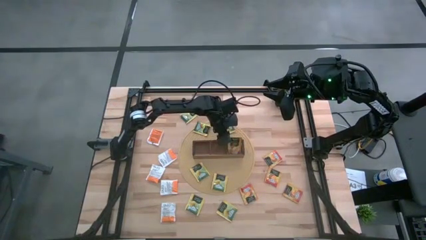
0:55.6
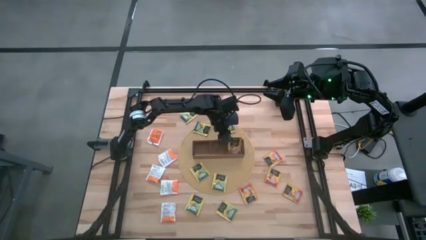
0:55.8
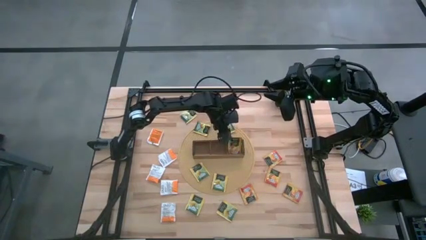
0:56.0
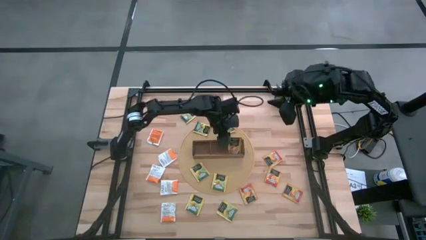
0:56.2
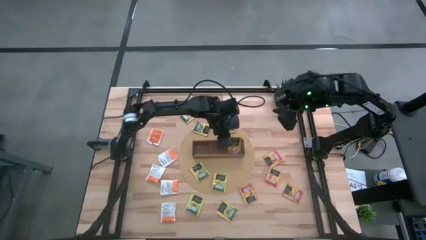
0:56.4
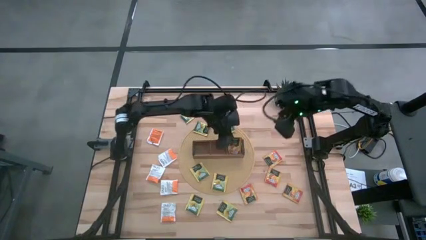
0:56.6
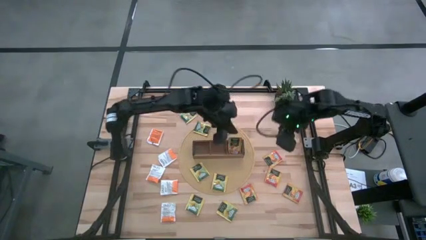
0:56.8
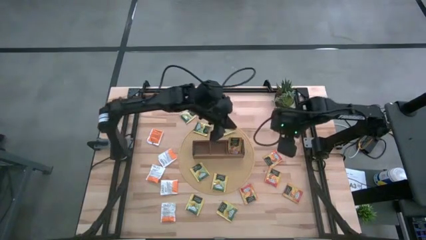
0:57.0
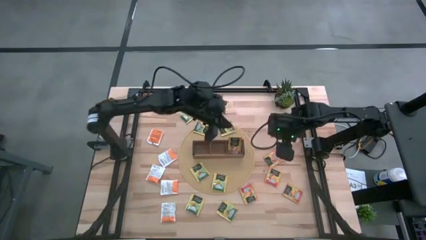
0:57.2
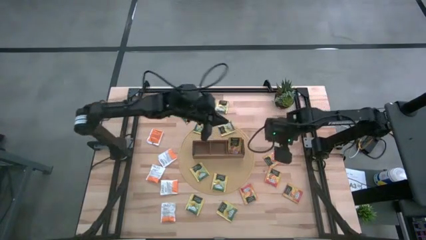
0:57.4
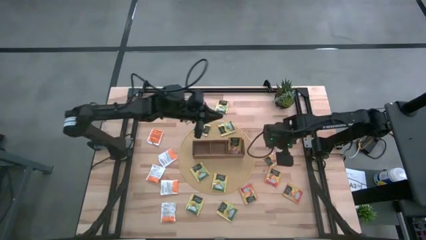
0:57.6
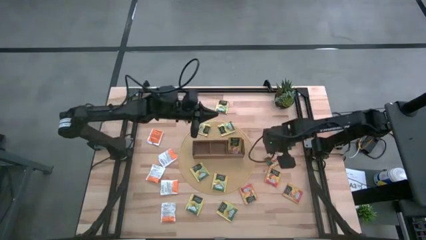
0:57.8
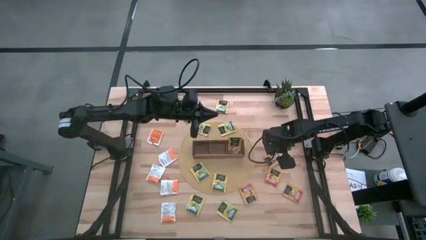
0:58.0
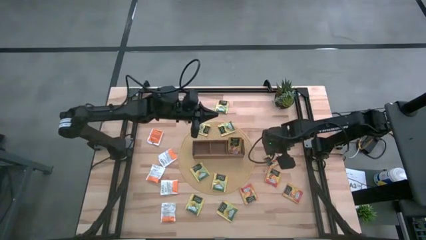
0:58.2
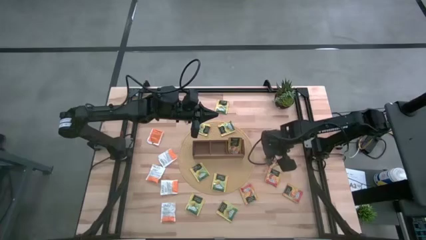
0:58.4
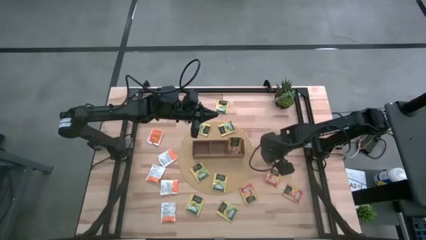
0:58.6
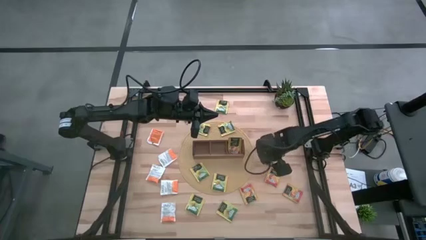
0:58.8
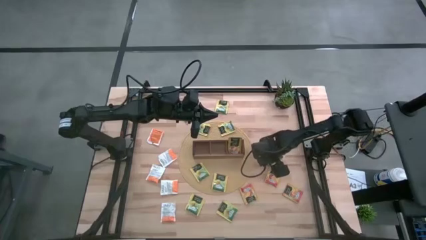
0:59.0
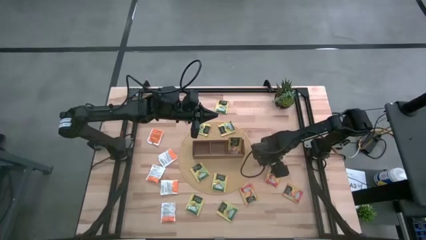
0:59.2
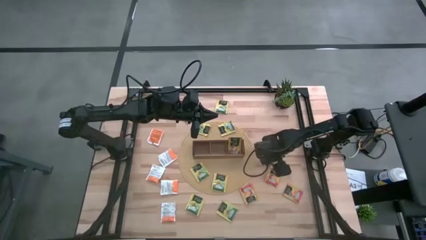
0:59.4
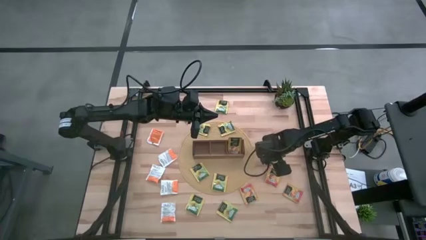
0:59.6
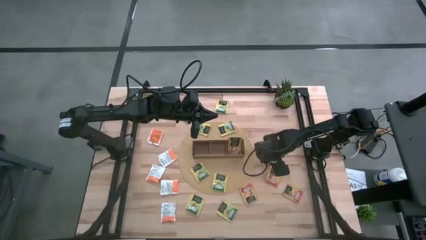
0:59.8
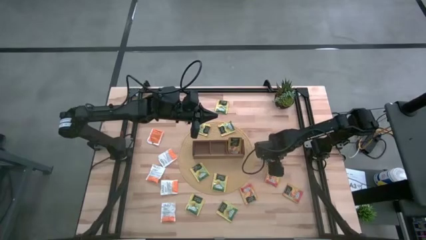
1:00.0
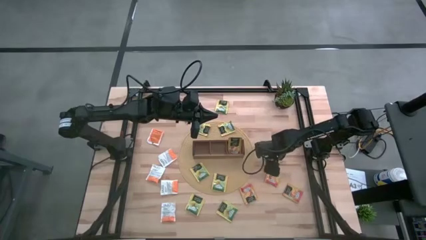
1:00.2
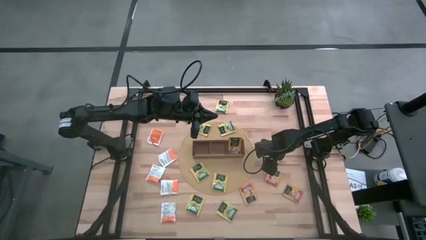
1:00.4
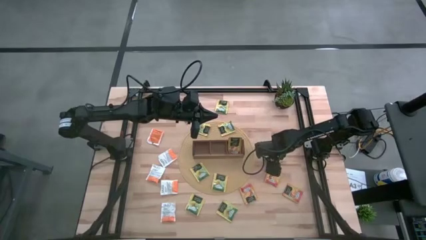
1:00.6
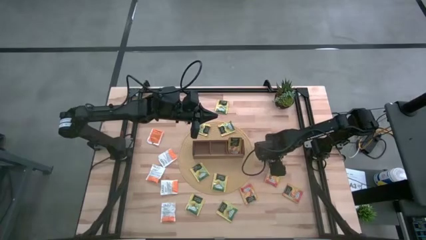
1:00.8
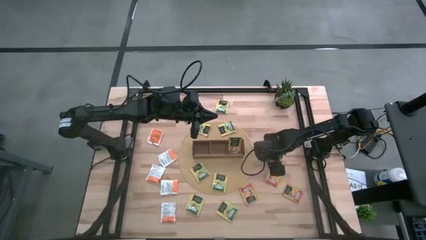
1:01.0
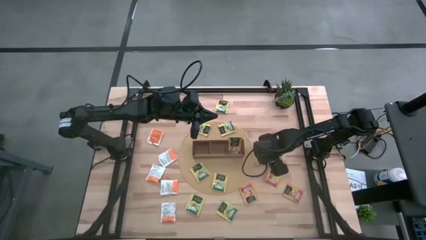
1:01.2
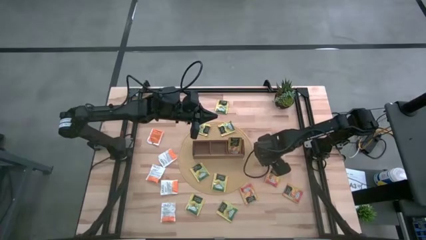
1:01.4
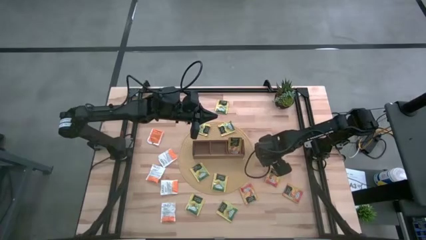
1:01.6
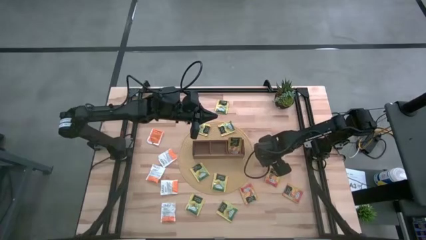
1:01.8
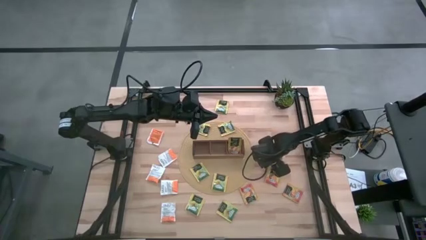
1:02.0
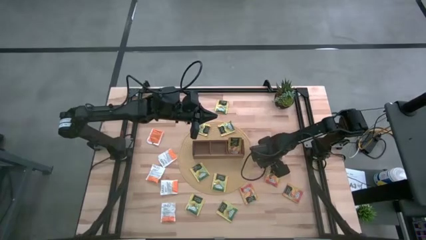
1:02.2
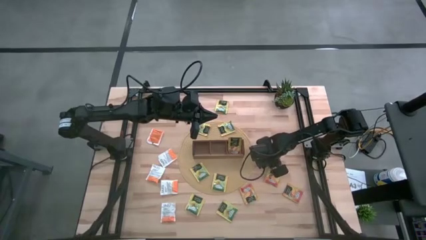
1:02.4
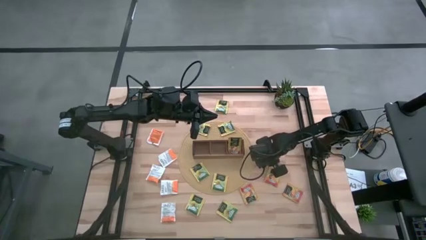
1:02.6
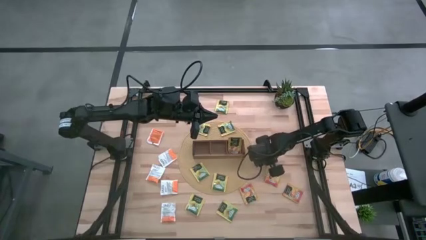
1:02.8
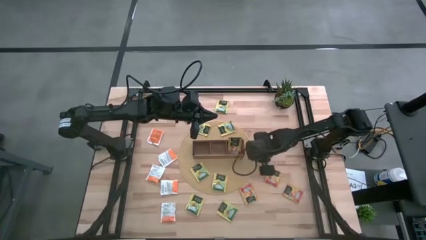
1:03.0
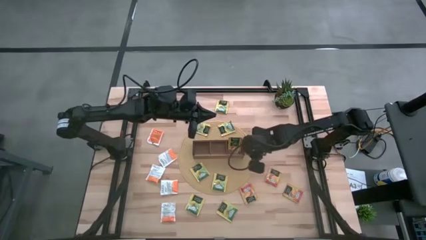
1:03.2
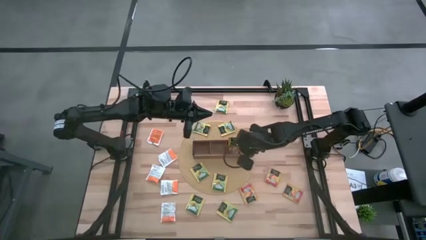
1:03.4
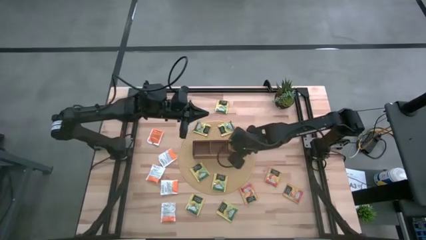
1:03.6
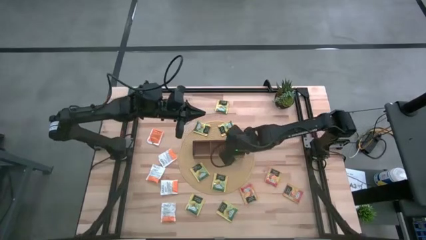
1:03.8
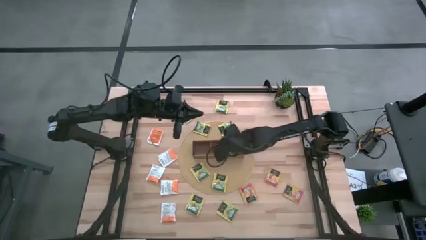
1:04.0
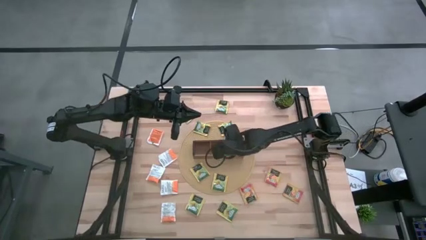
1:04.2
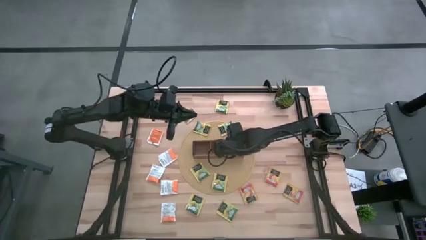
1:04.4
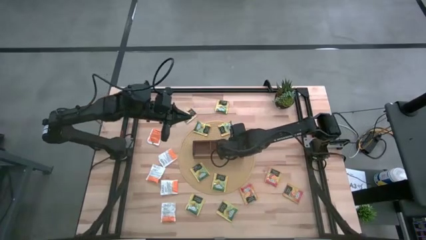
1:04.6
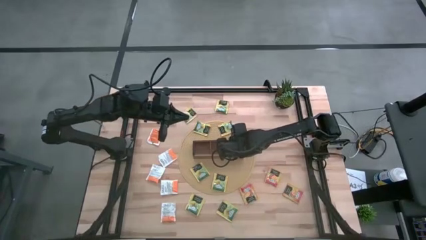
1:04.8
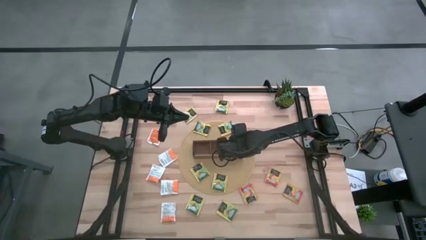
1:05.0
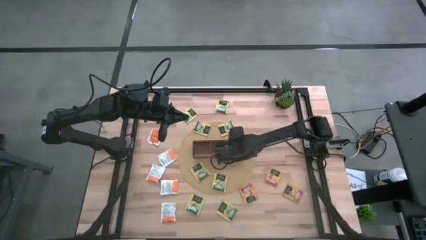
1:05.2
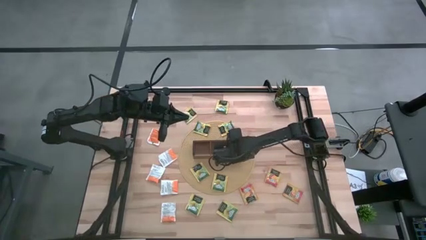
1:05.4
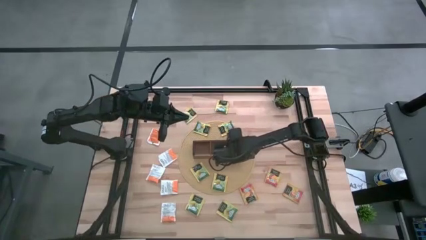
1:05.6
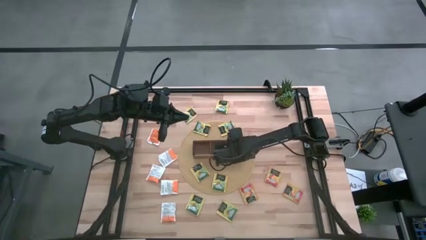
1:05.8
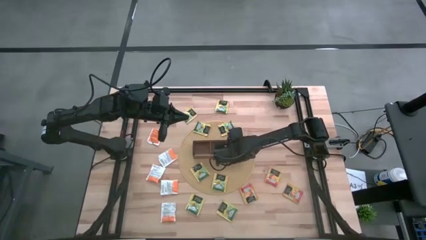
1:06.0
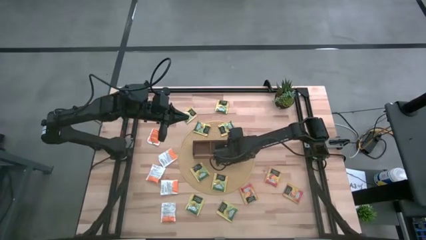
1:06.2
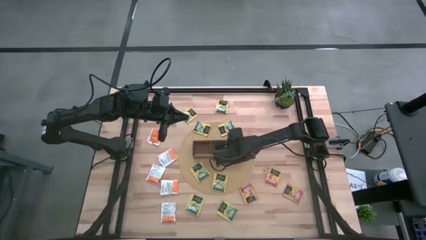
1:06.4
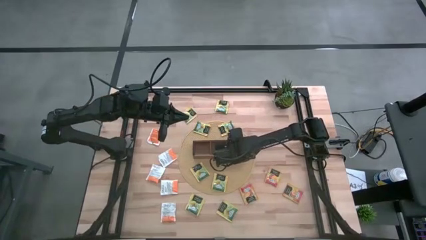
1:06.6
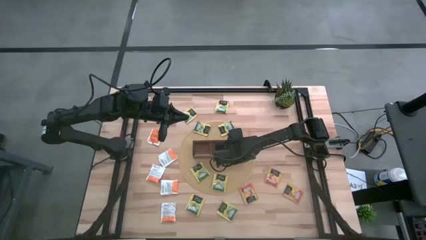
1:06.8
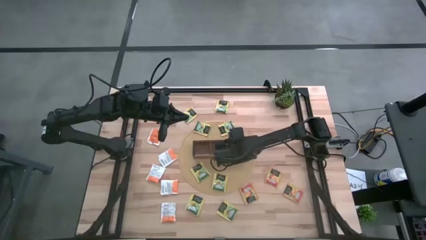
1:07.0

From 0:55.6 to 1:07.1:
Task: Pick & Place Tea
Put the orange tea bag into the right section of the wooden organizer

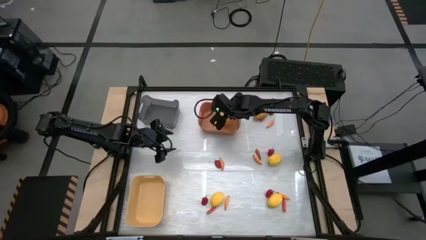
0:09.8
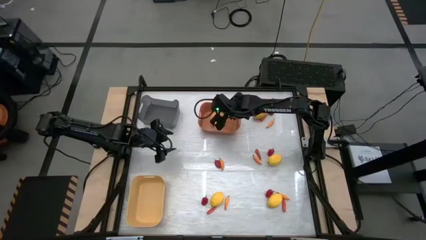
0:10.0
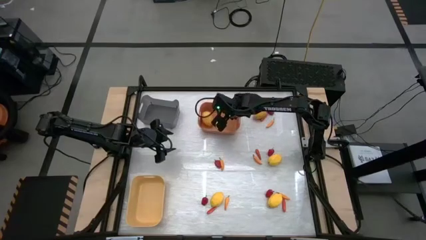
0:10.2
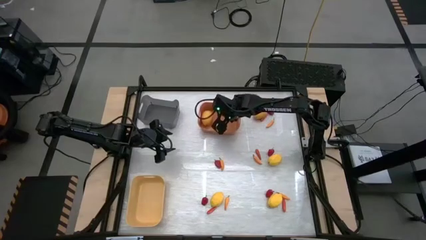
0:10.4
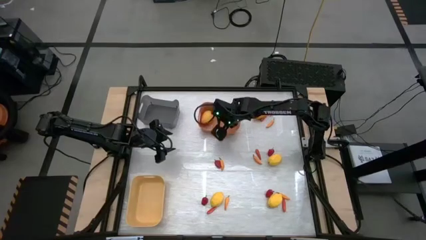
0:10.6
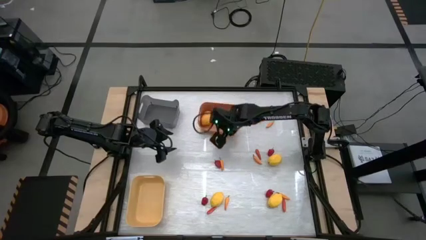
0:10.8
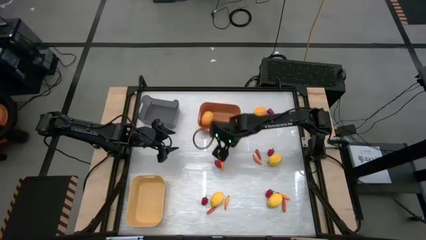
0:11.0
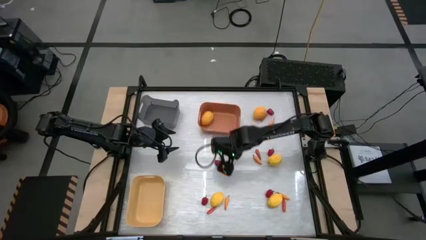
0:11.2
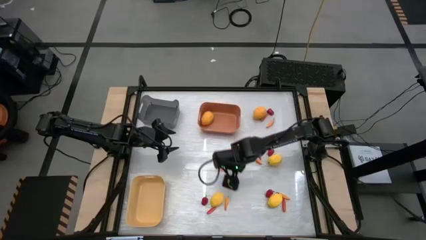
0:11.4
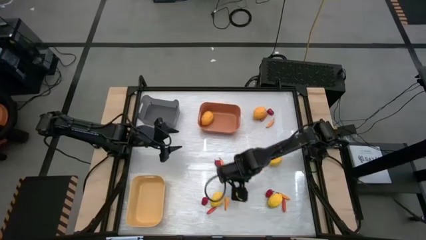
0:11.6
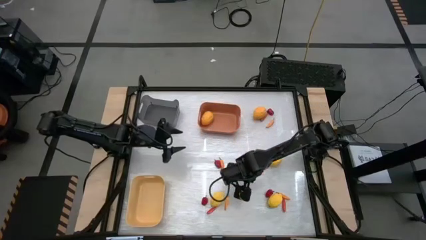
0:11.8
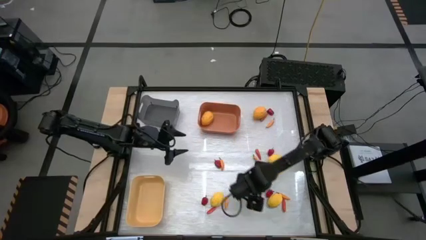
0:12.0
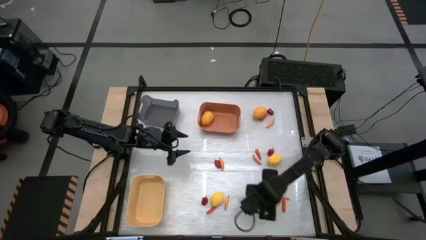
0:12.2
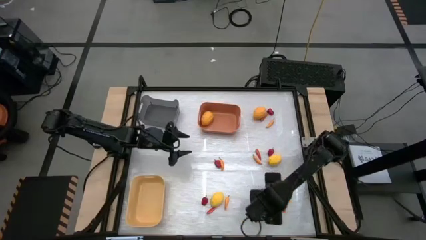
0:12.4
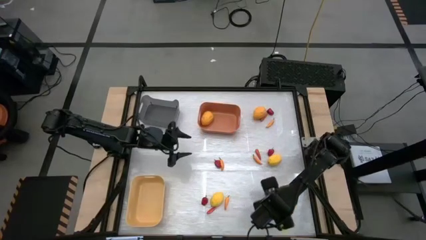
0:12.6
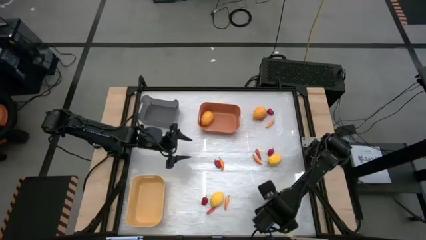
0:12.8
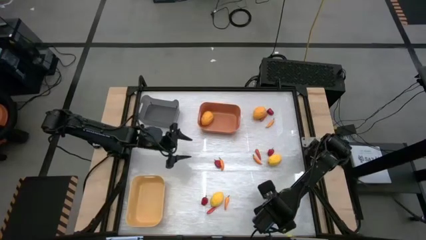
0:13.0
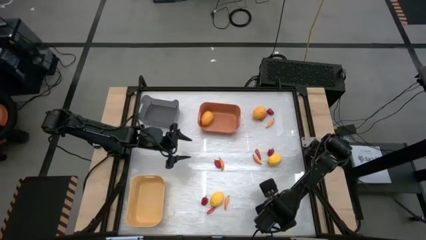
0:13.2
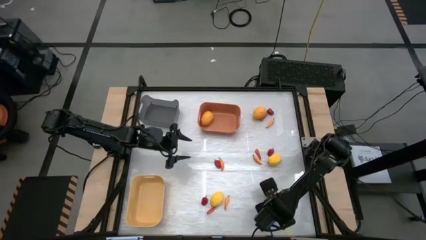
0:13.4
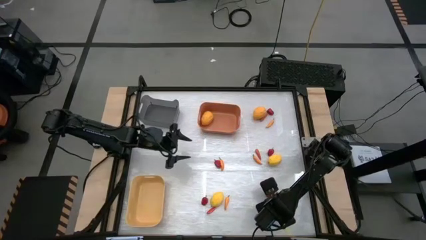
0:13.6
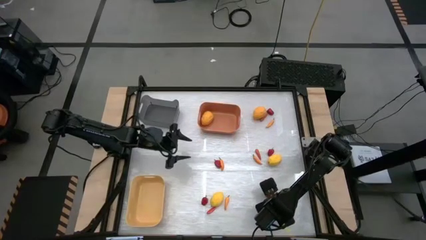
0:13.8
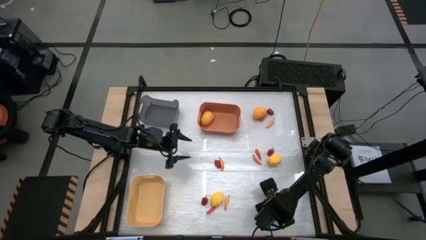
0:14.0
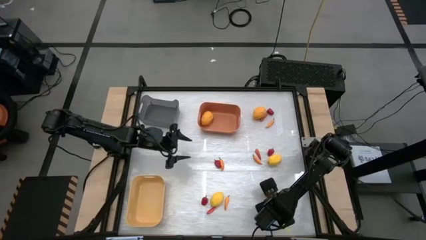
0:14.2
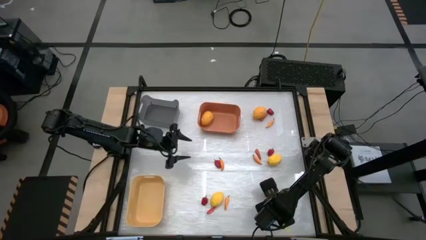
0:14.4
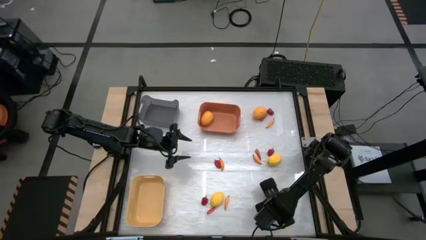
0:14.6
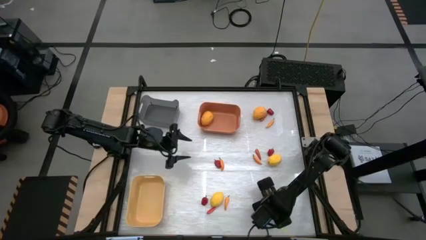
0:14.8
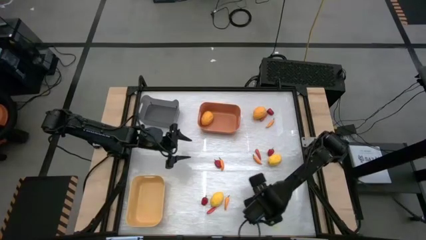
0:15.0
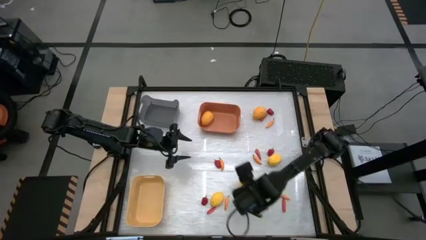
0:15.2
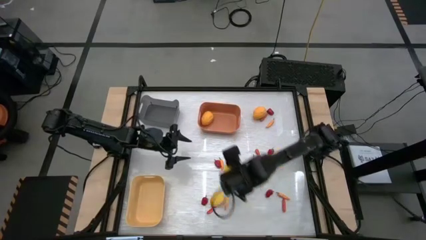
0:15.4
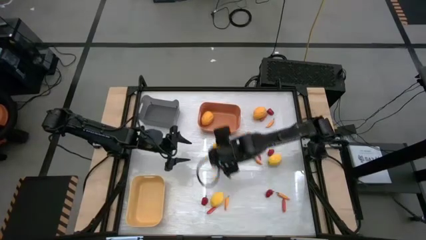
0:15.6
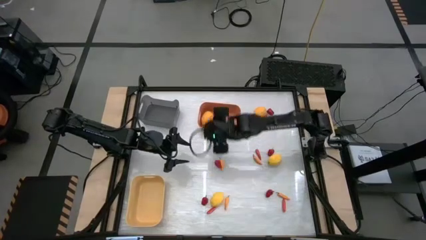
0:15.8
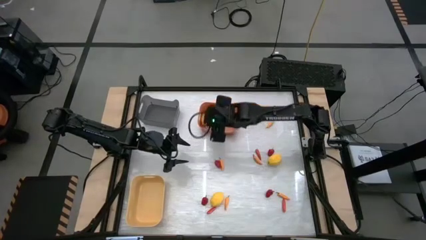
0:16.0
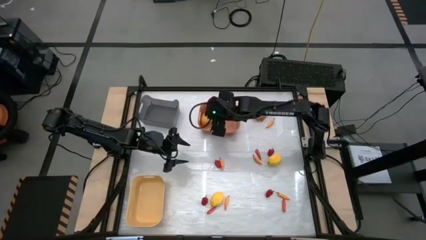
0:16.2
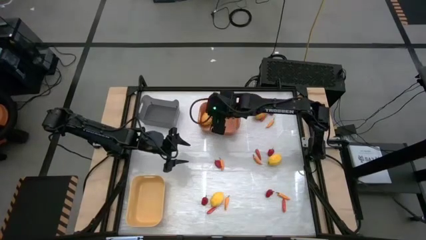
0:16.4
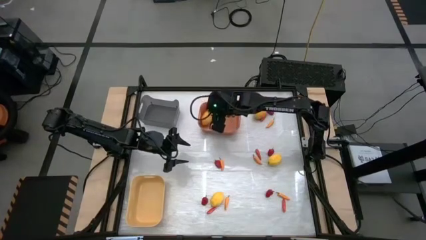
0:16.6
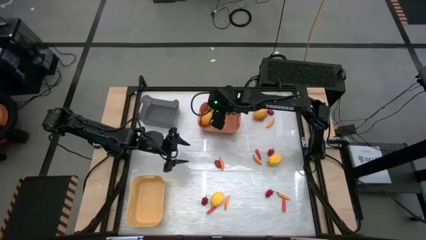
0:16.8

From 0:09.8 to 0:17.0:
Task: Sort produce into baskets
Put the lemon into the orange bin
